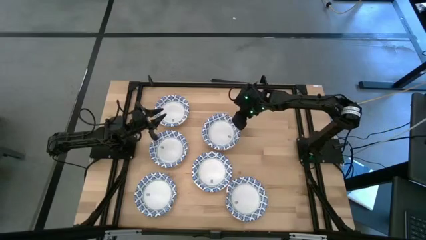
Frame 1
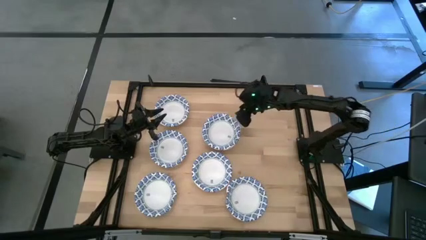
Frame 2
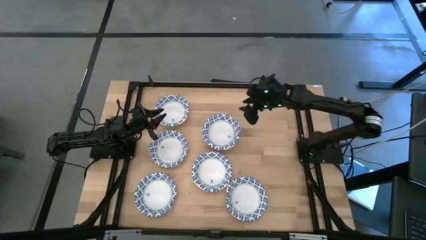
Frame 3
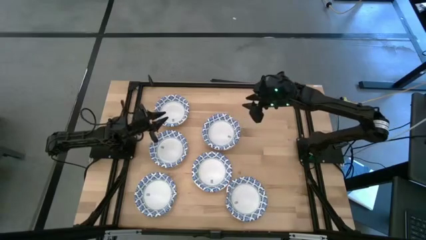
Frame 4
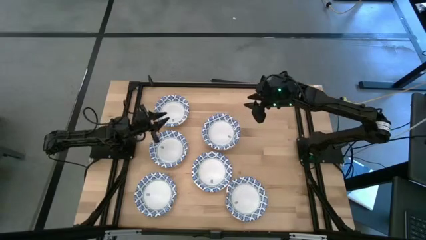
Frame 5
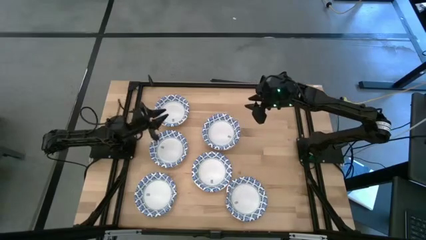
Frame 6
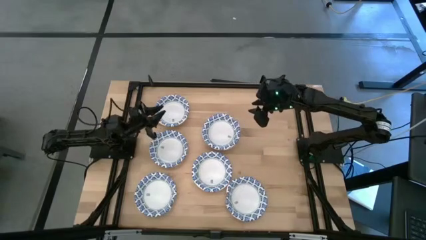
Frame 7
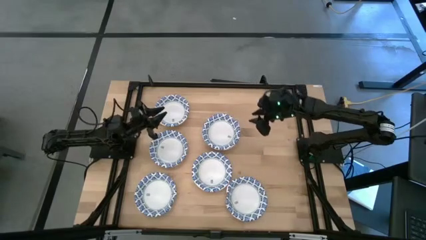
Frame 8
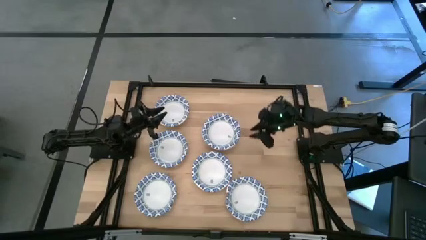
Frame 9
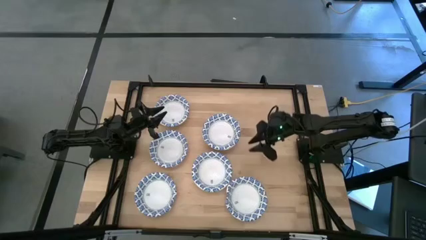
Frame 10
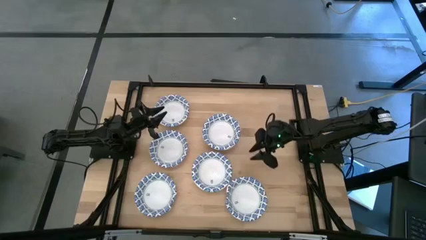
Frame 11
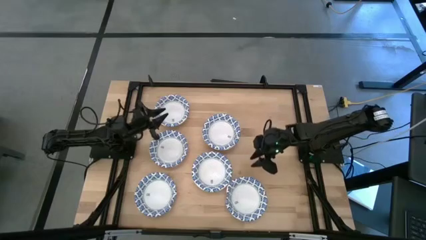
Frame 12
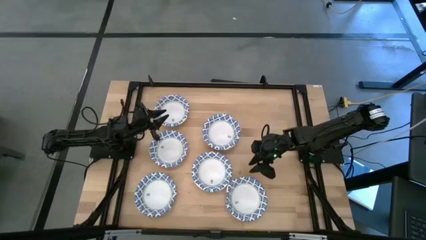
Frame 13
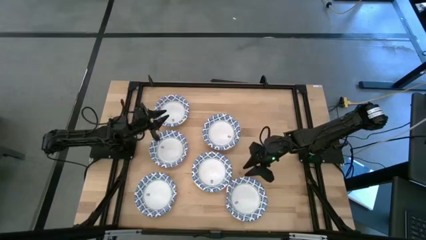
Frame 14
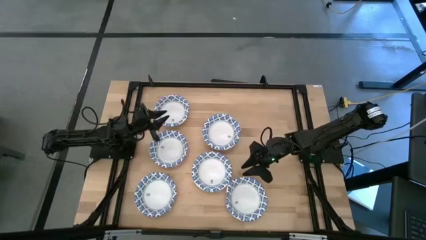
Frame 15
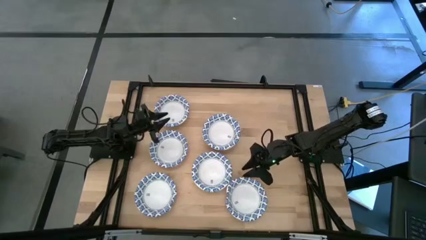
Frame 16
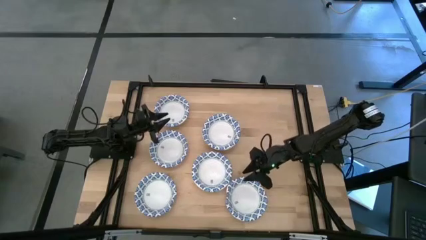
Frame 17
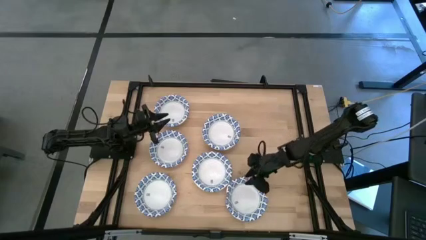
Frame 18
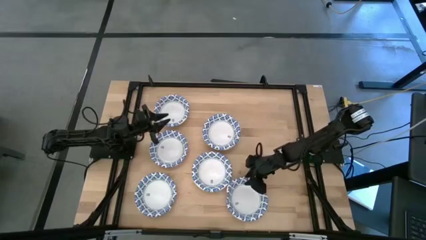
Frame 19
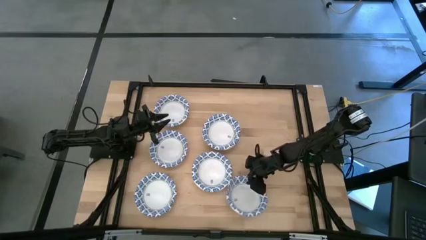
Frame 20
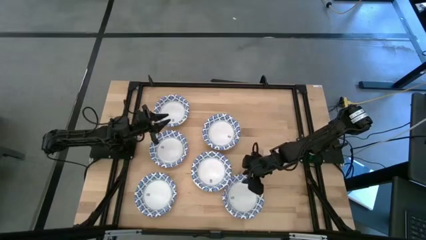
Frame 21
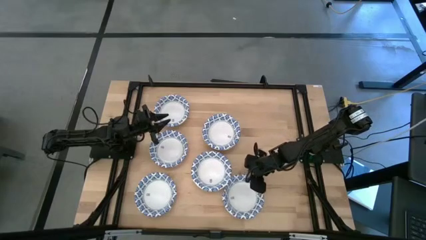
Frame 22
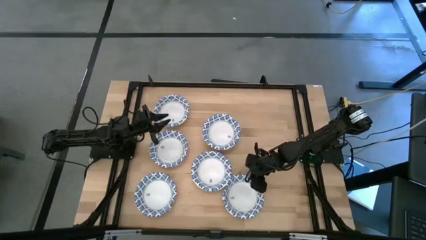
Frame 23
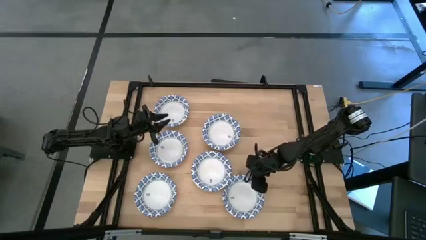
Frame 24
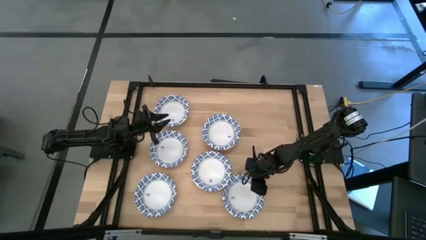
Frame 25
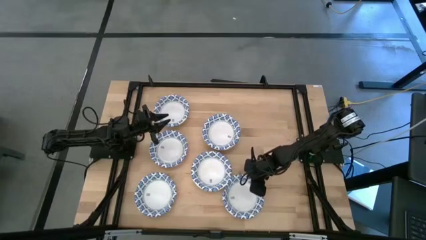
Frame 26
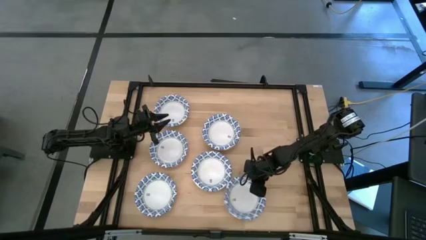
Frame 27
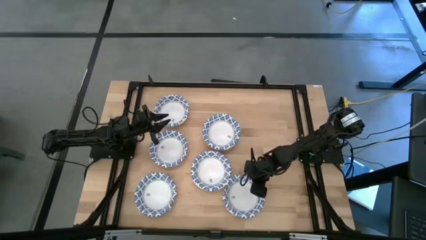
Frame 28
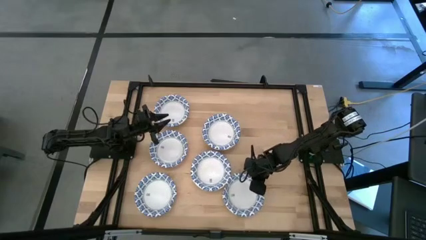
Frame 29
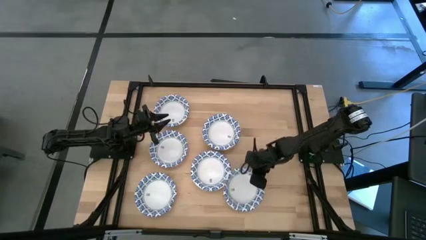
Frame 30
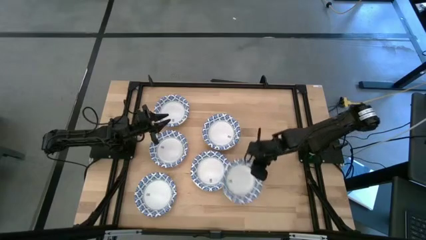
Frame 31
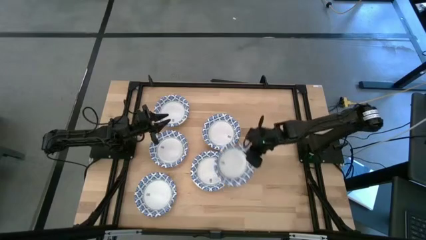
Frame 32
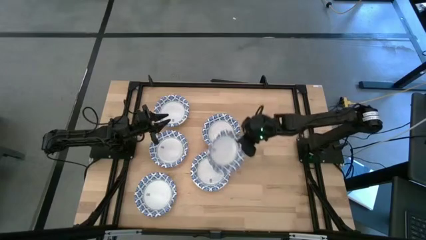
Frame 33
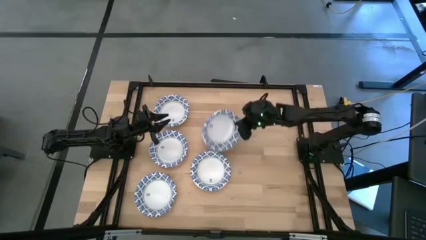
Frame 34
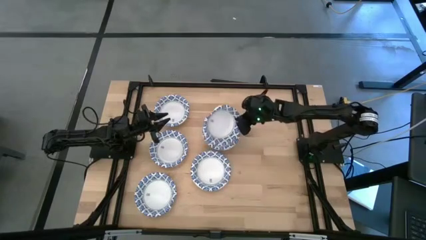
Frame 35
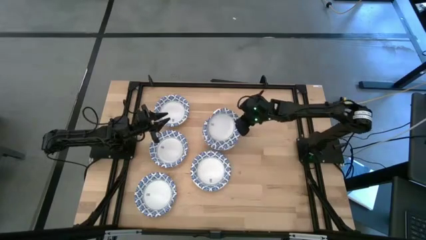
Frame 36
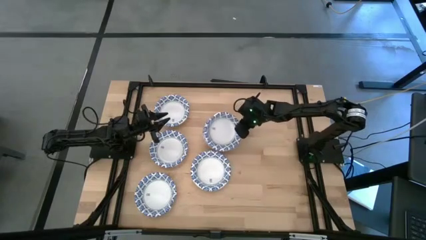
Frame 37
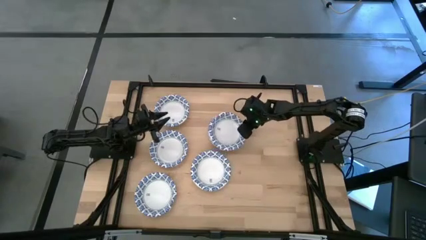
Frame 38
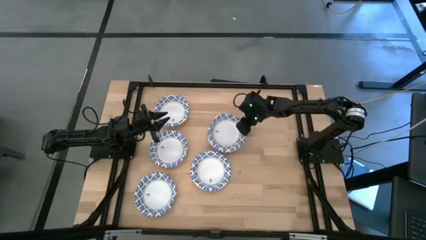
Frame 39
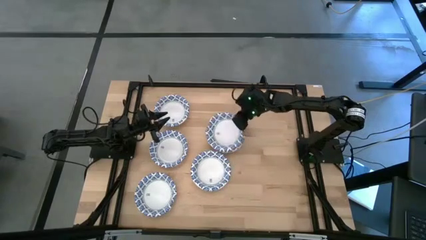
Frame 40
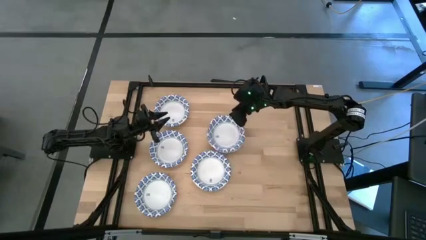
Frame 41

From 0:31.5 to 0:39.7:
Task: Nest bowls inside each other
Stack the bowl on top of the bowl on the table

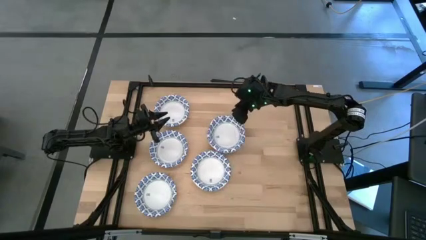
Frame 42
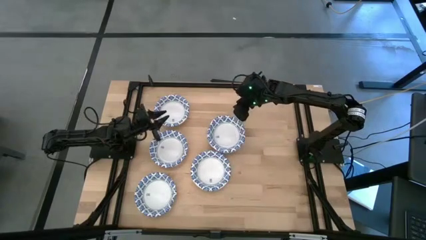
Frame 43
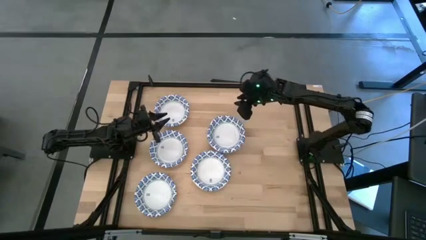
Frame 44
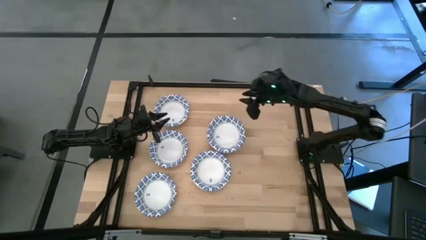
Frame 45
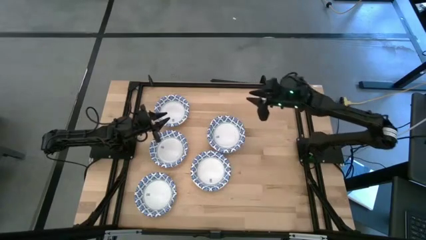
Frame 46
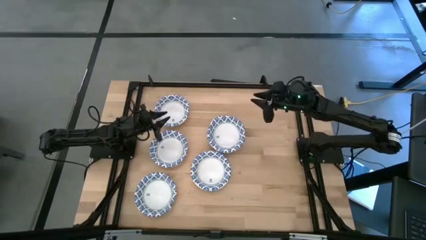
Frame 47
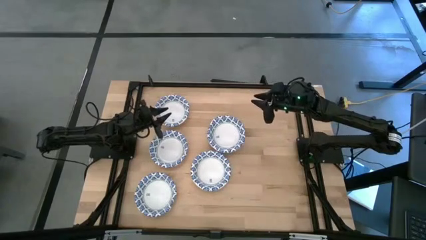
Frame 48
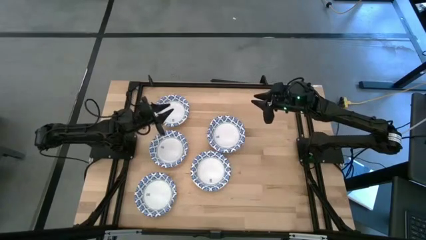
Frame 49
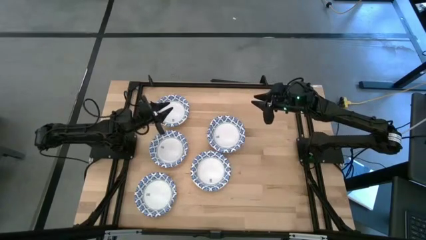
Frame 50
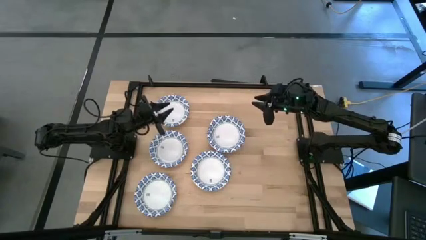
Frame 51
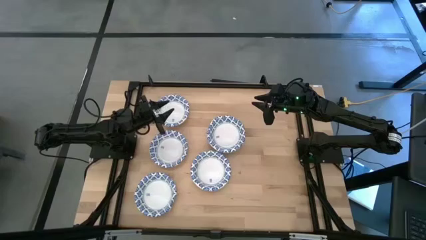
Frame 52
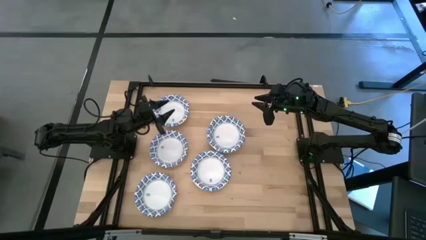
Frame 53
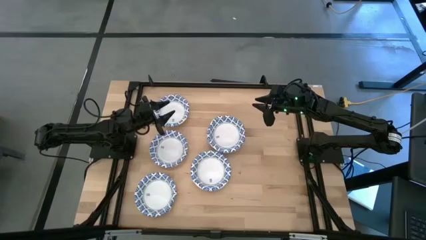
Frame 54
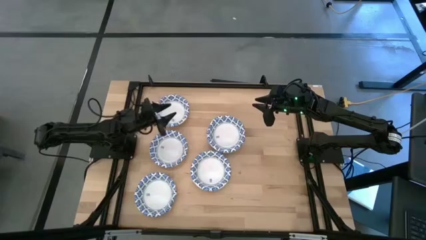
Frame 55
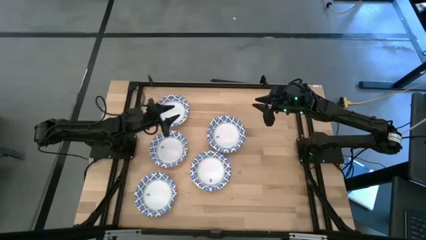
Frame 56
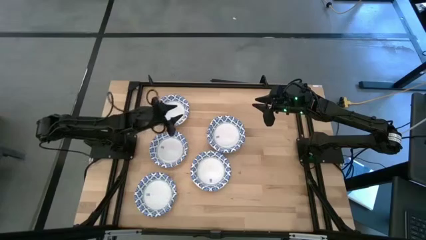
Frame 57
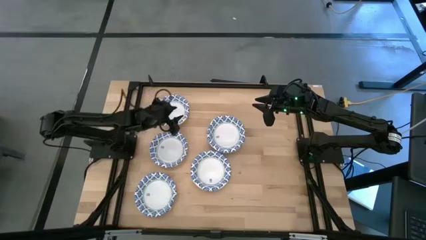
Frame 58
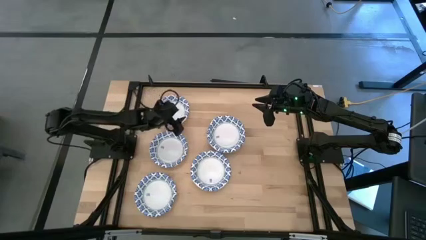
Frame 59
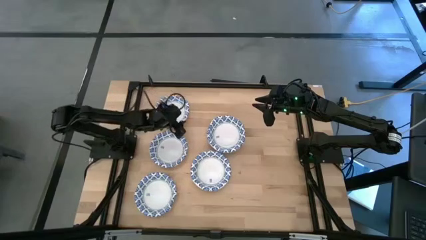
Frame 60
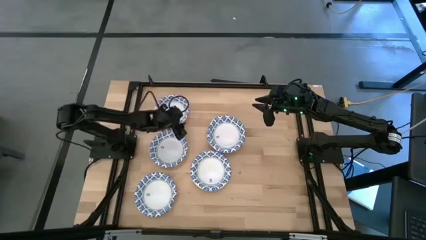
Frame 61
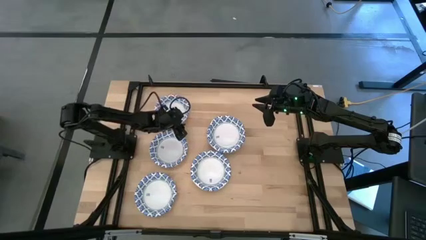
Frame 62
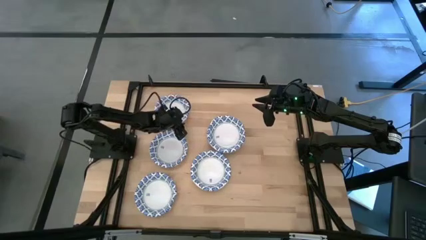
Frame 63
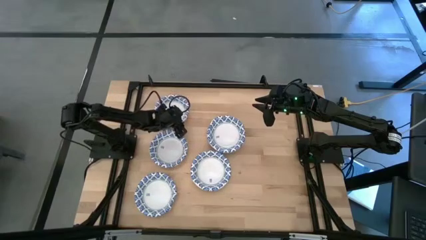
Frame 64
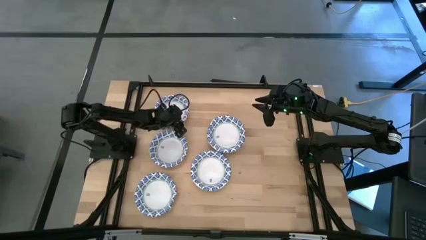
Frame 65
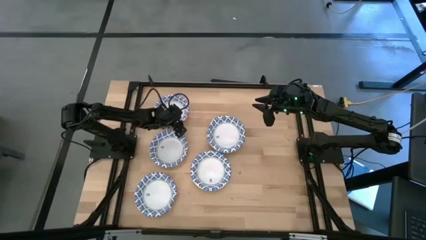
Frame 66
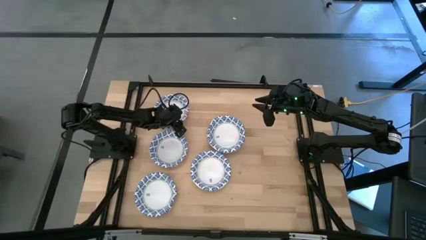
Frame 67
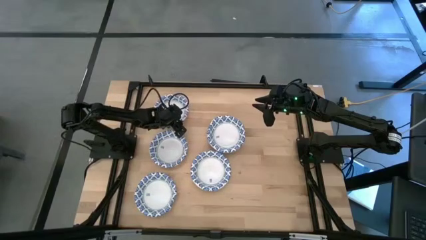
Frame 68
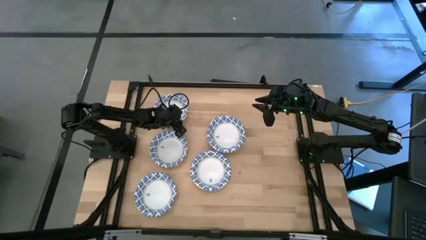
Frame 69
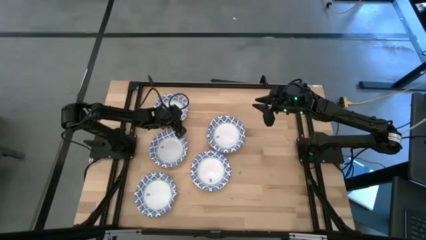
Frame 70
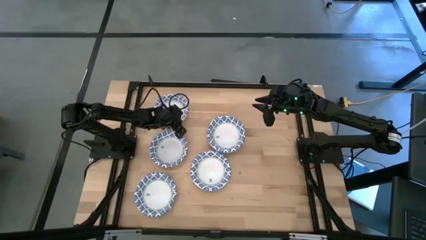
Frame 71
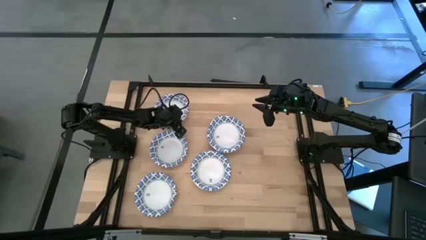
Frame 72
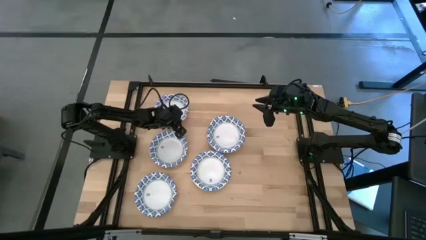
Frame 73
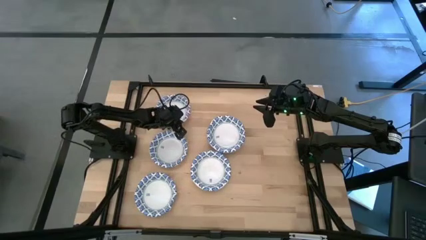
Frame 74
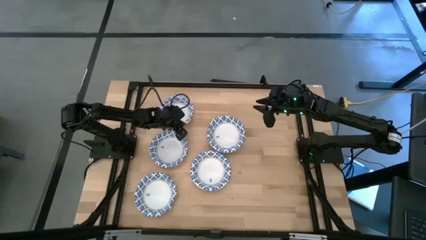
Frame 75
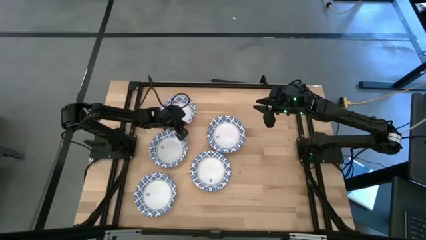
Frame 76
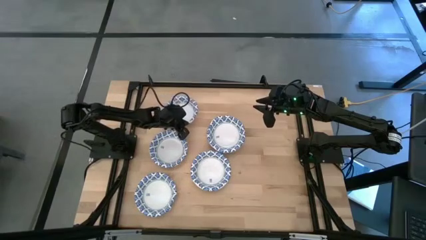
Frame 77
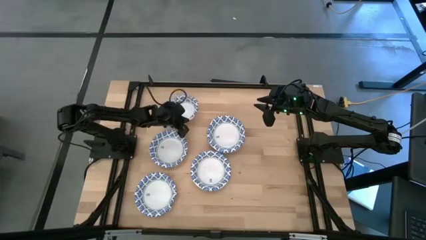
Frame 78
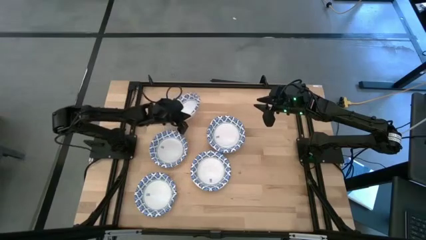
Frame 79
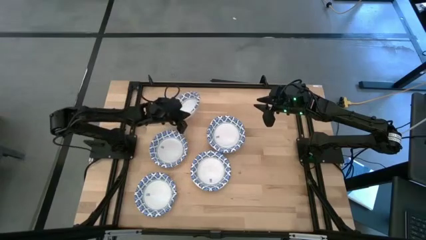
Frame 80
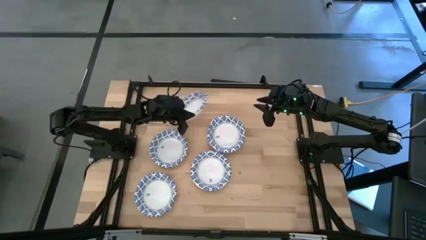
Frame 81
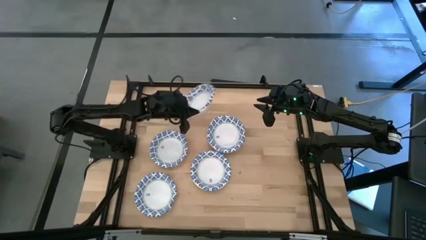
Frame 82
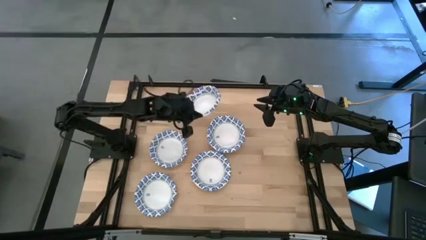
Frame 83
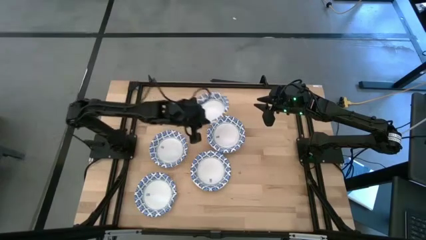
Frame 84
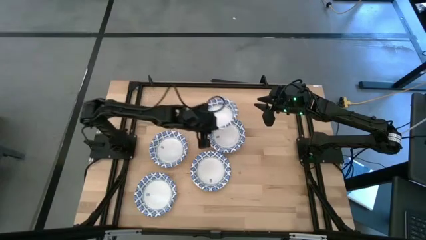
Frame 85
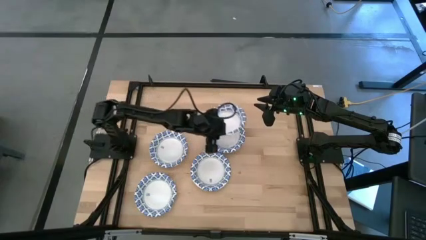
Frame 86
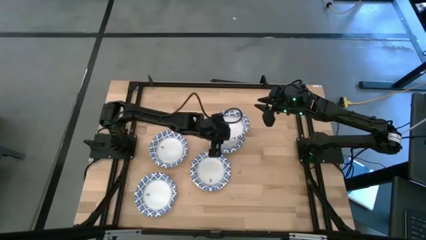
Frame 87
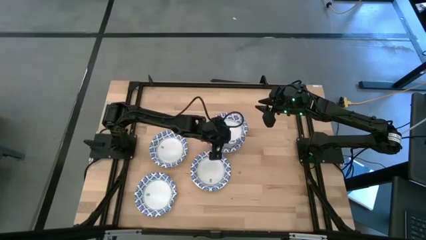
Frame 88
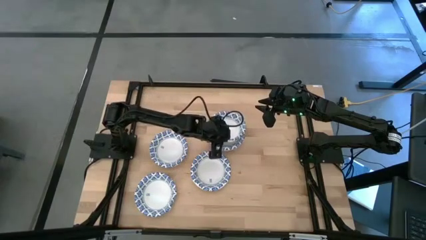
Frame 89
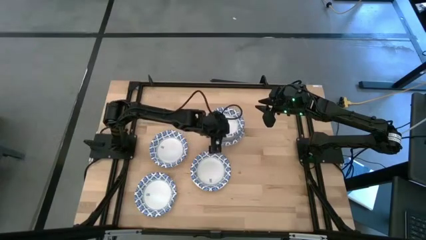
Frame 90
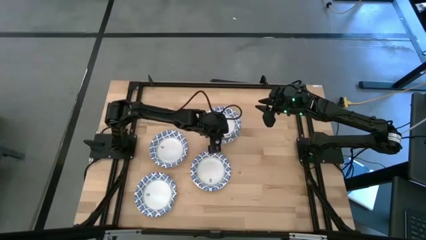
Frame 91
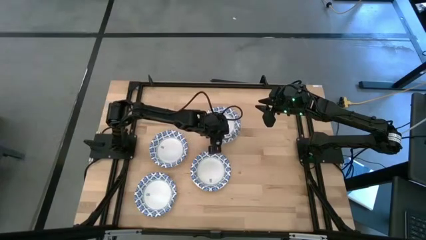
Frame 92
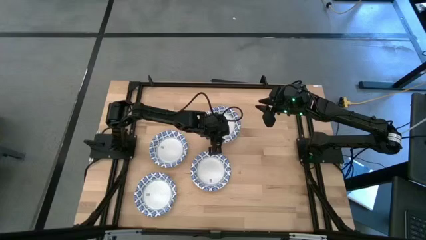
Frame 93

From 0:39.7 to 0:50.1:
Stack the bowl on top of the bowl on the table
